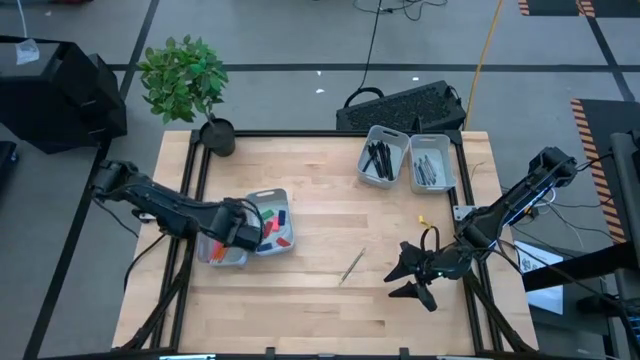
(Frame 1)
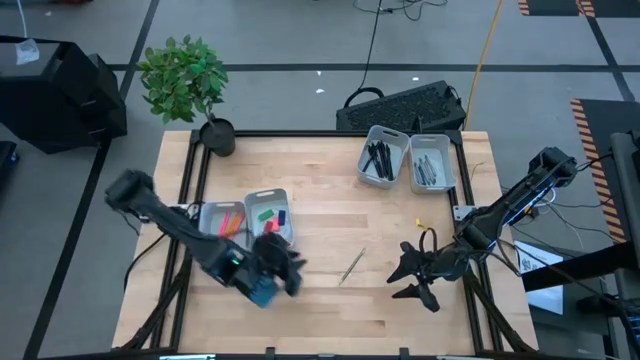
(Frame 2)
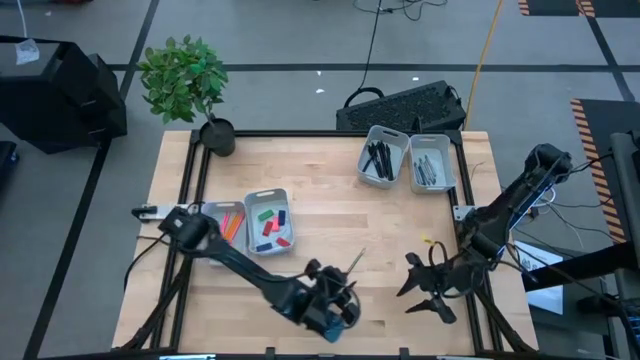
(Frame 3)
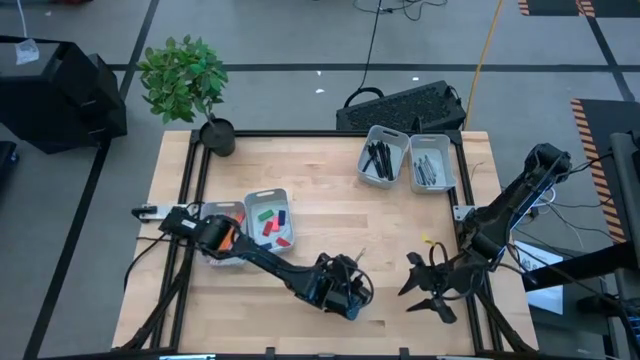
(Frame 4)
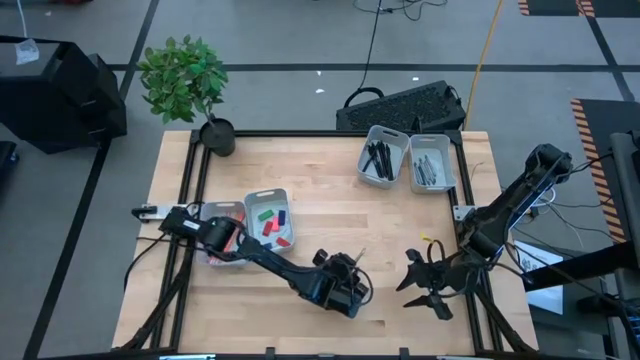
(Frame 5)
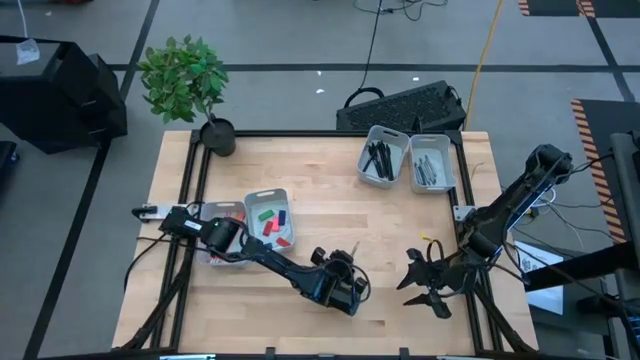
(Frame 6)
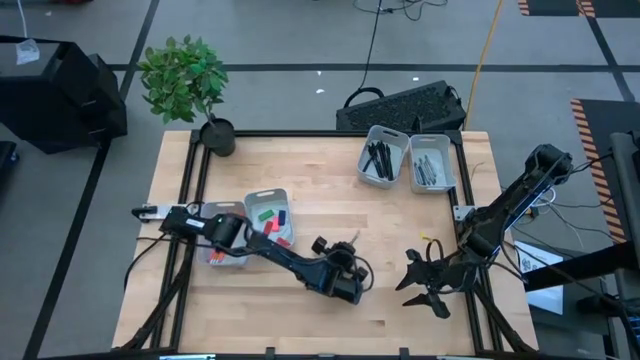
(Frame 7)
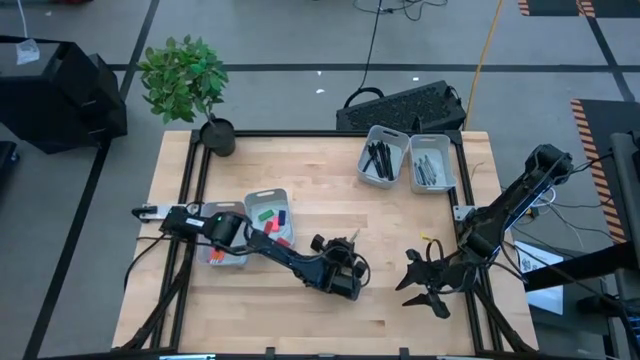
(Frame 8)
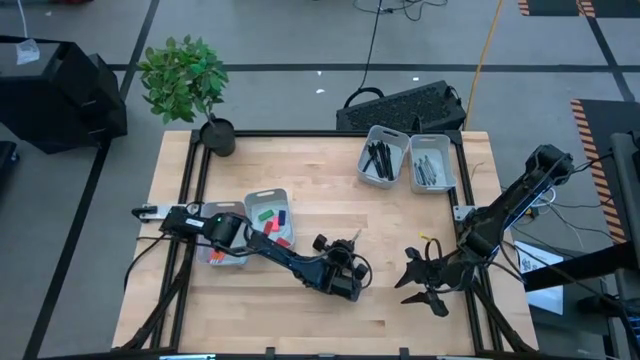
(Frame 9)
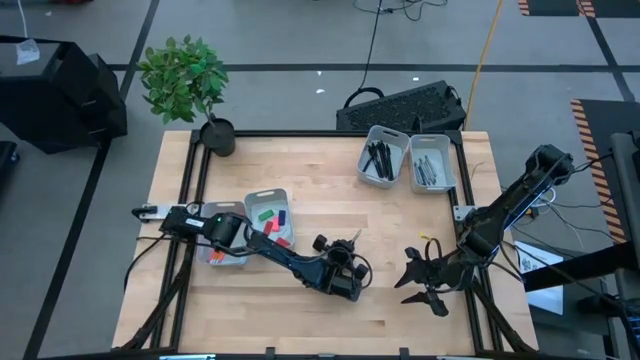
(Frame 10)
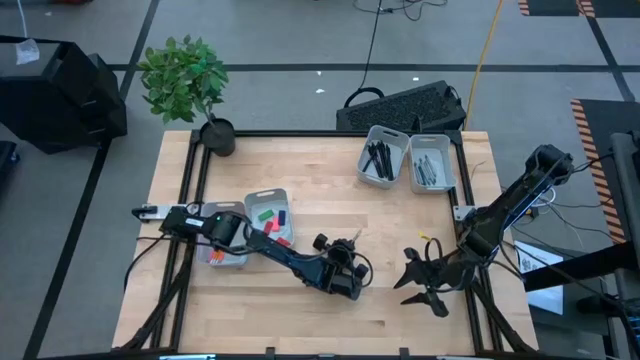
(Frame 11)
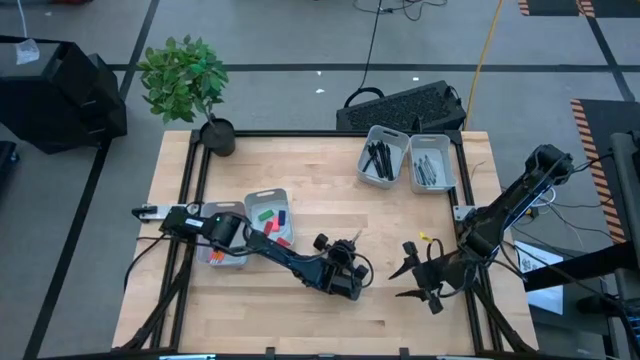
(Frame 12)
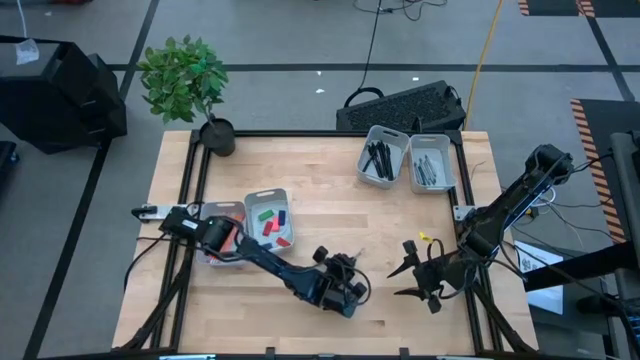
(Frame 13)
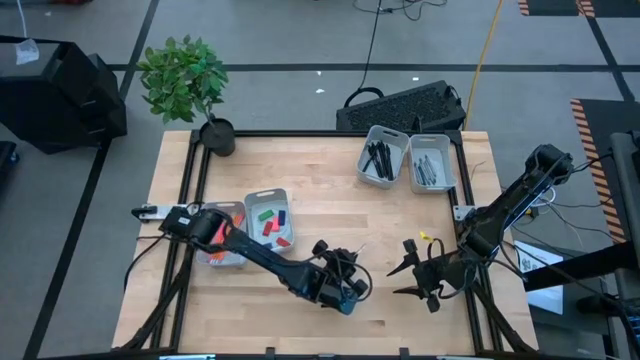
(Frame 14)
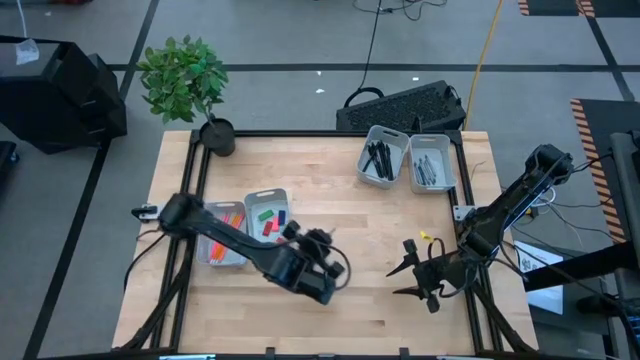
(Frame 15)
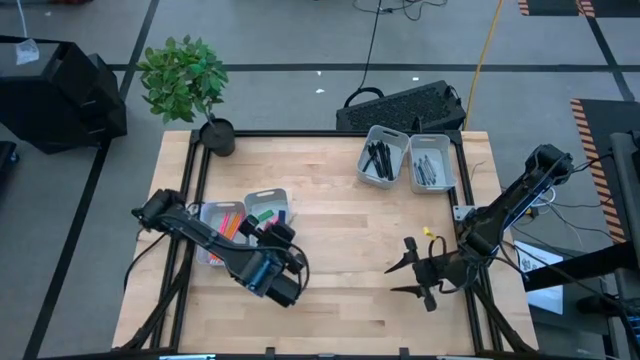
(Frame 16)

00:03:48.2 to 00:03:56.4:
Task: Sort crayons/erasers/pens/pencils in bins
Put the black pencil into the bottom left gray bin

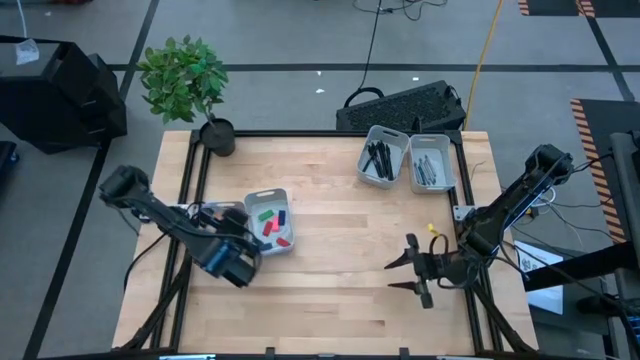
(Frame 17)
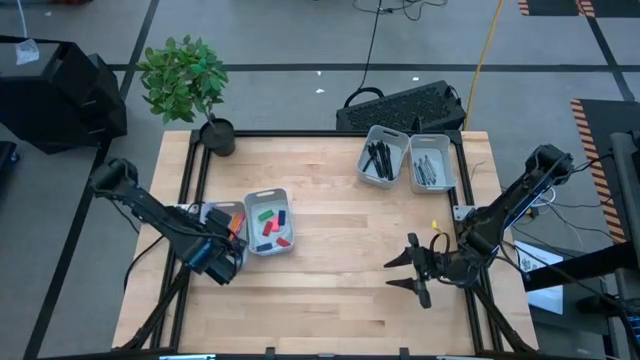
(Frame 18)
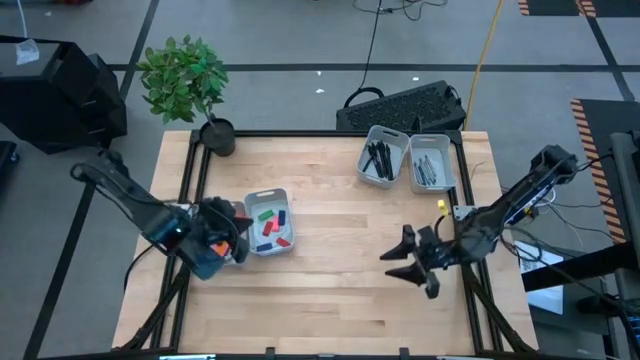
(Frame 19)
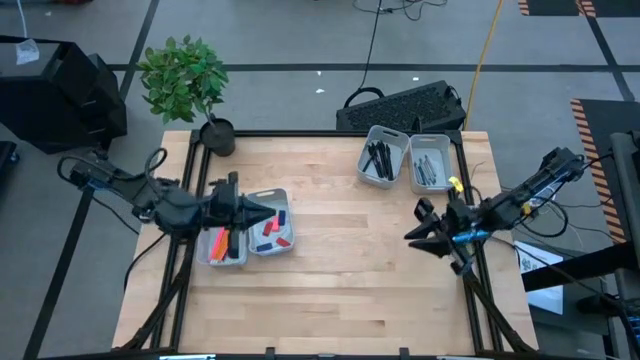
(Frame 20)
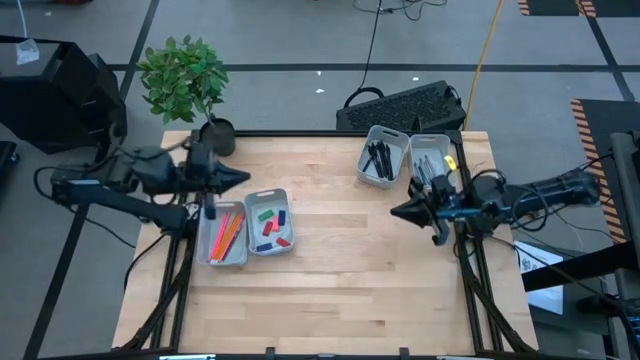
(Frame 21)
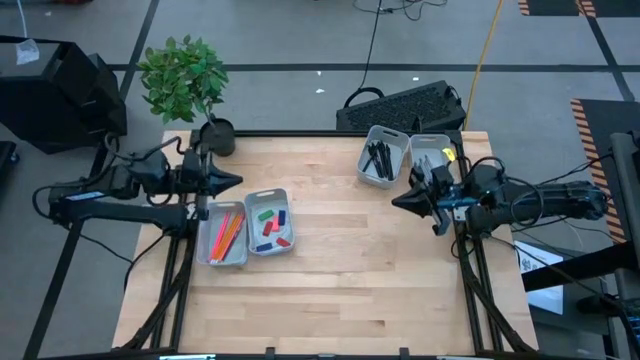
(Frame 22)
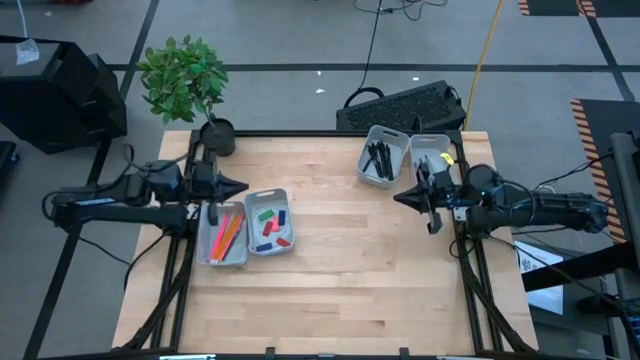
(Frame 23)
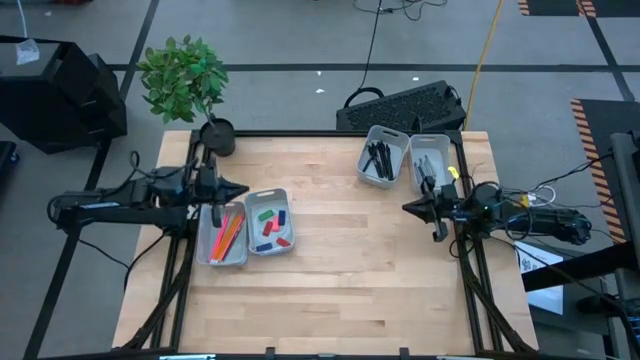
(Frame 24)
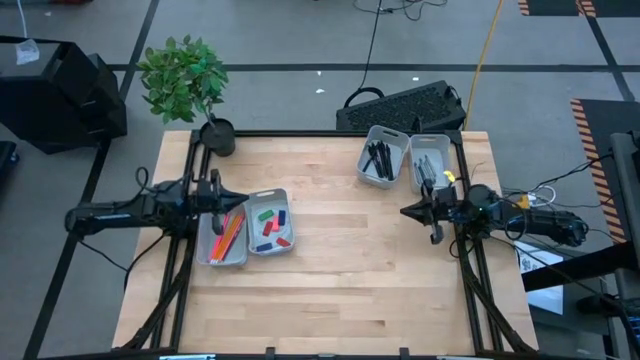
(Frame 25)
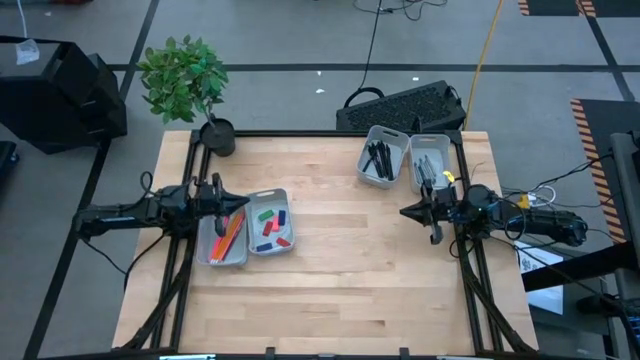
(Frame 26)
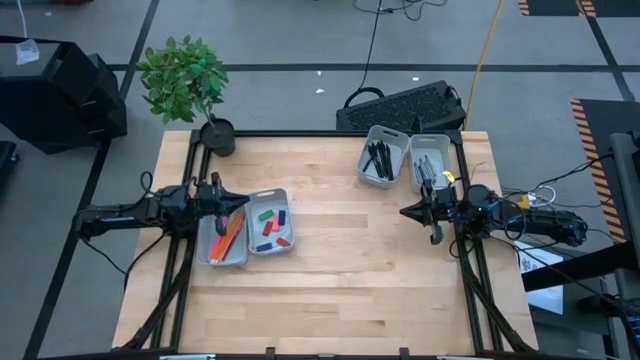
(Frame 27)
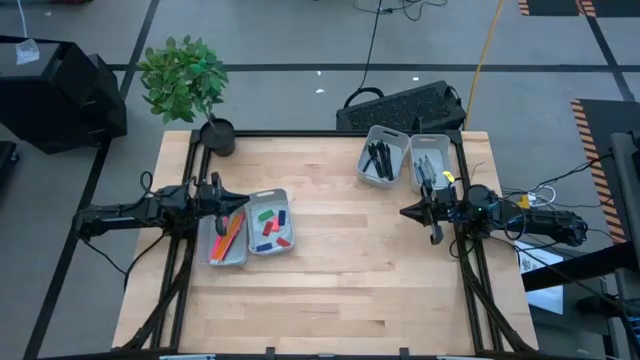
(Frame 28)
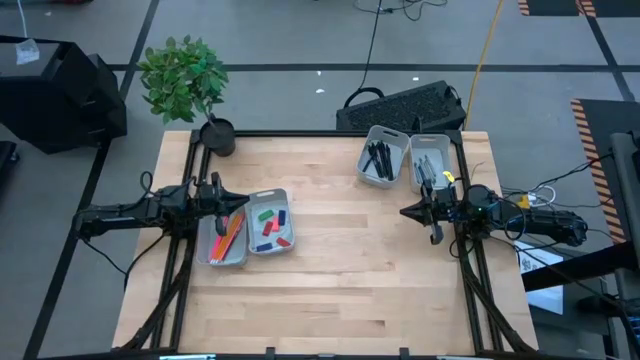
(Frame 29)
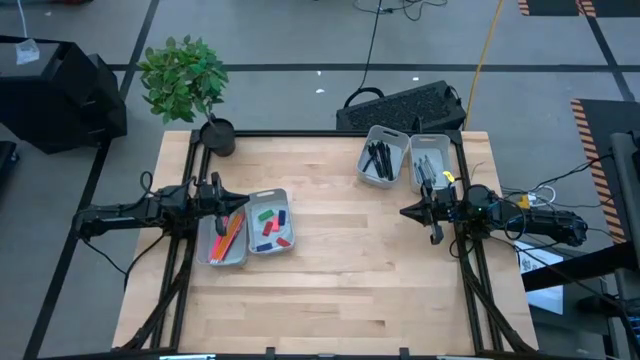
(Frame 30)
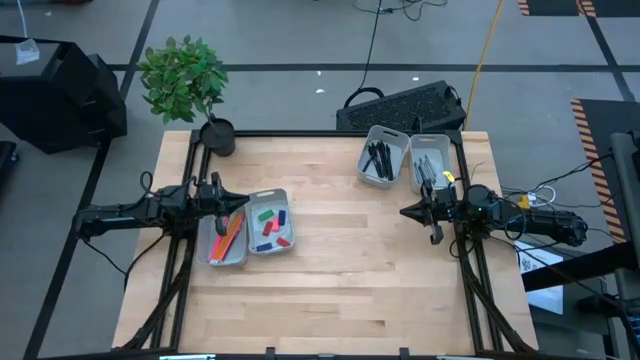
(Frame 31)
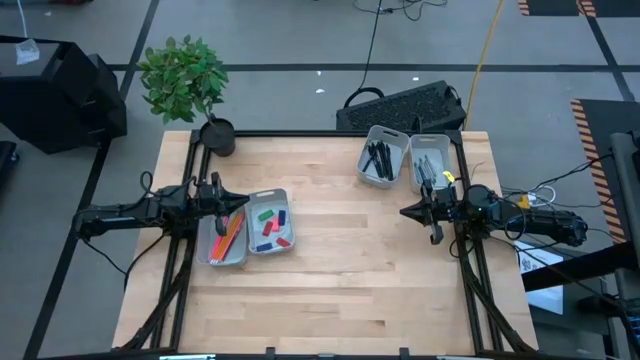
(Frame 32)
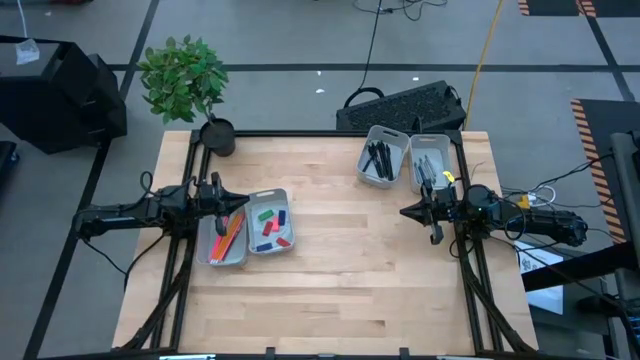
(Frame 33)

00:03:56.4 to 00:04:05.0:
Return to Home Position

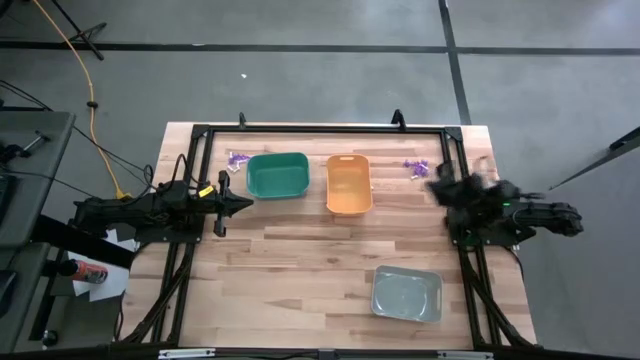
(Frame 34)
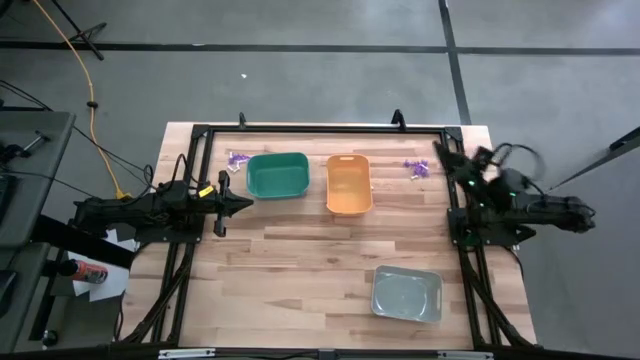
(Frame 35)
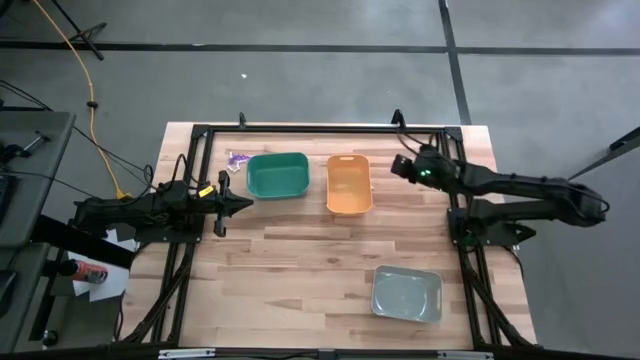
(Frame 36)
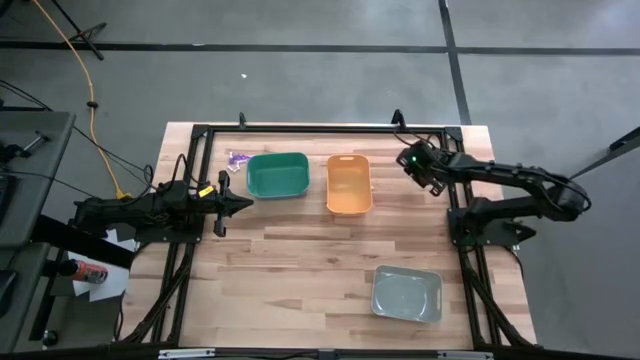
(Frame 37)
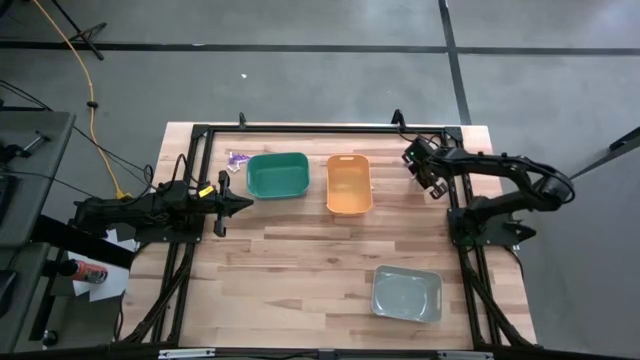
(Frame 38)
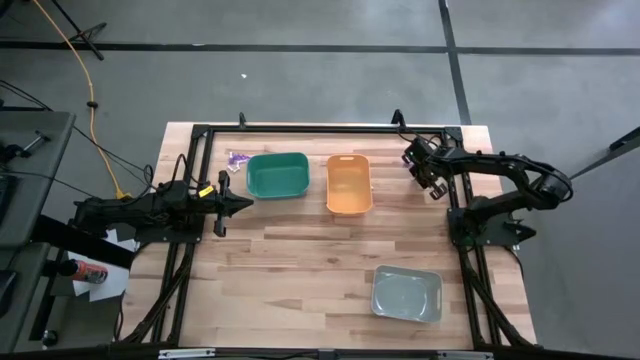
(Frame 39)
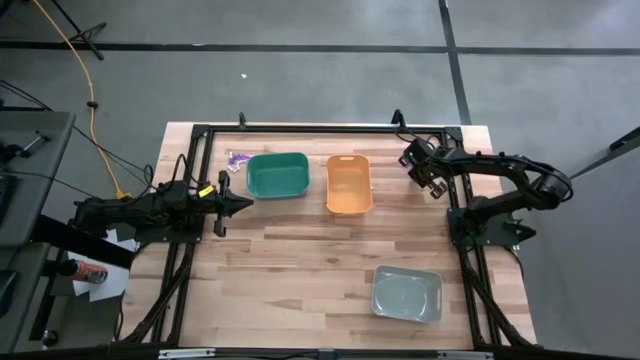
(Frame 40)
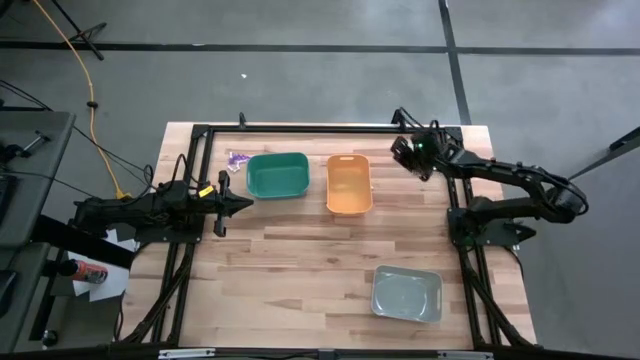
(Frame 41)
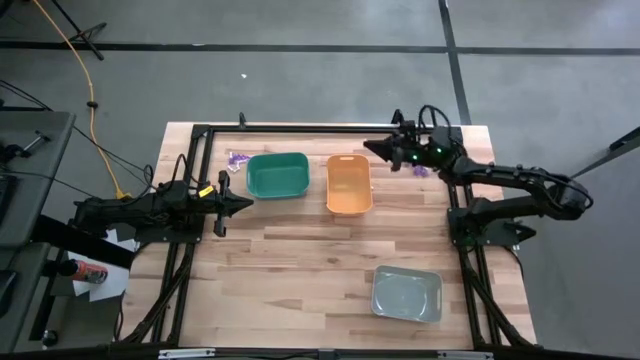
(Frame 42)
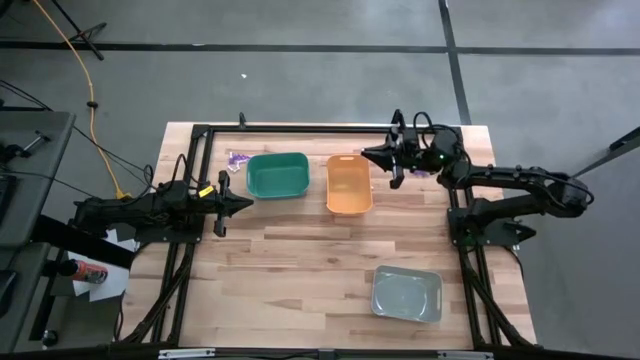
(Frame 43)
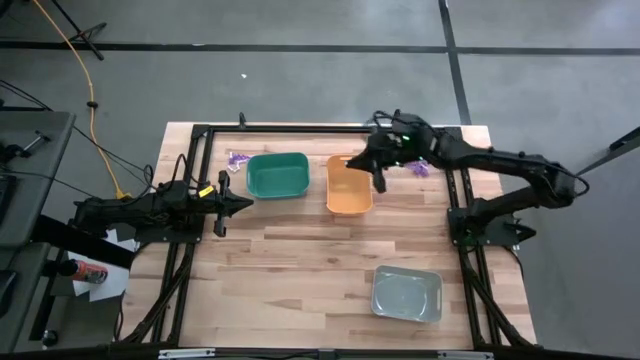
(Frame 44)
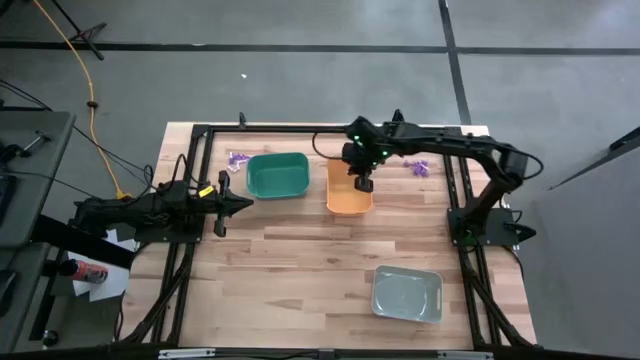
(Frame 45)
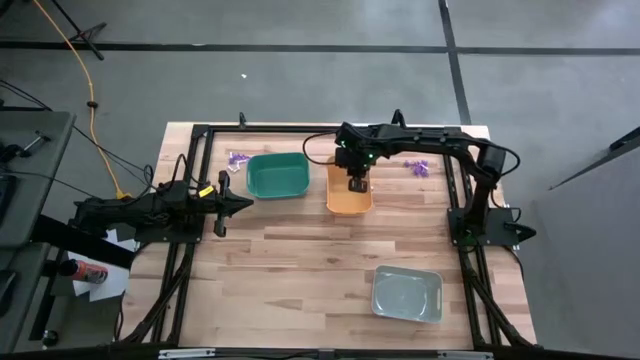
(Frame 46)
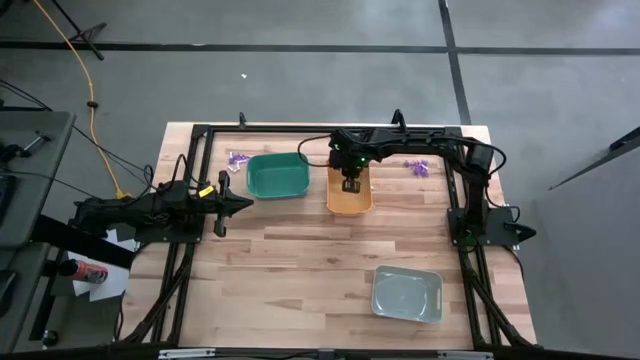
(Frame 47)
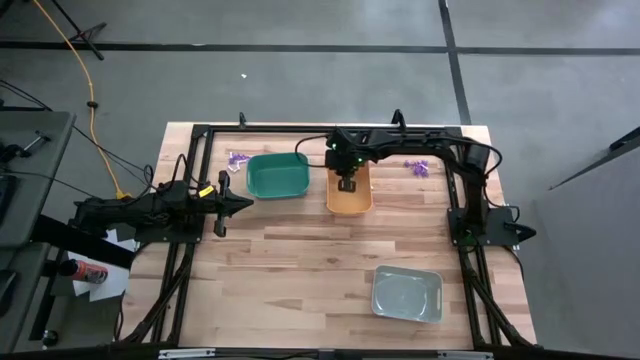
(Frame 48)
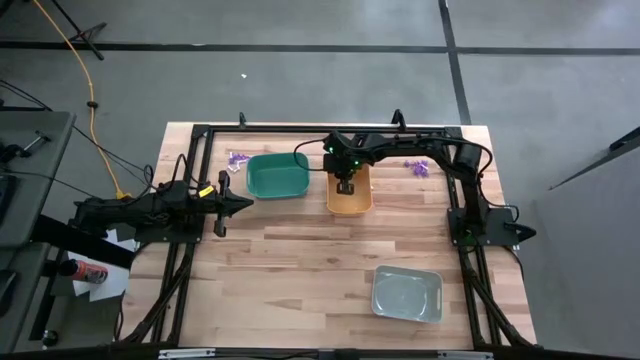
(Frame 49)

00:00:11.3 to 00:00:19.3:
Task: Sort Halloween decoration
Put the white bone toy into the yellow bin
